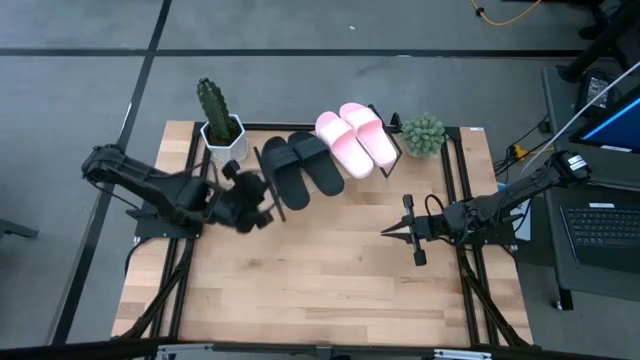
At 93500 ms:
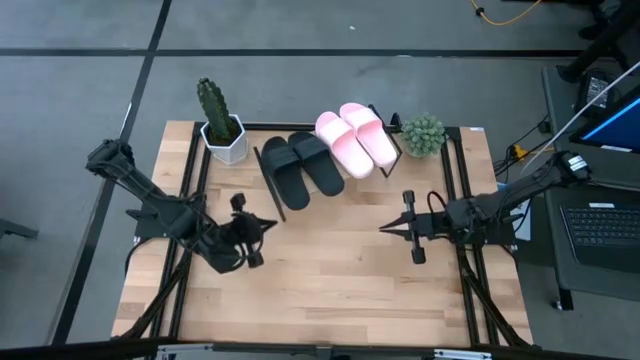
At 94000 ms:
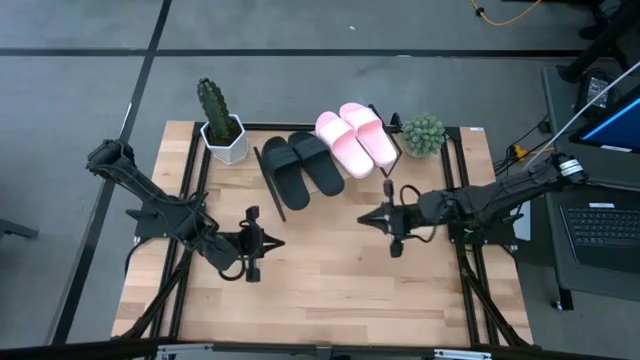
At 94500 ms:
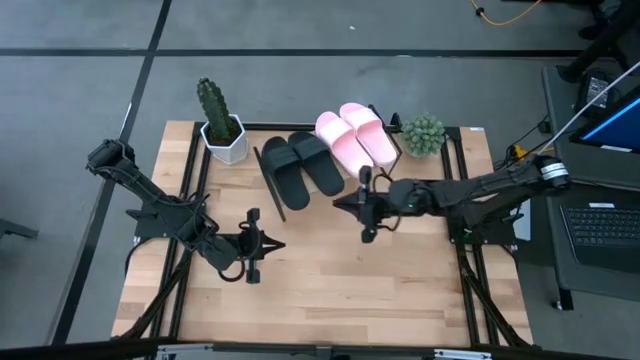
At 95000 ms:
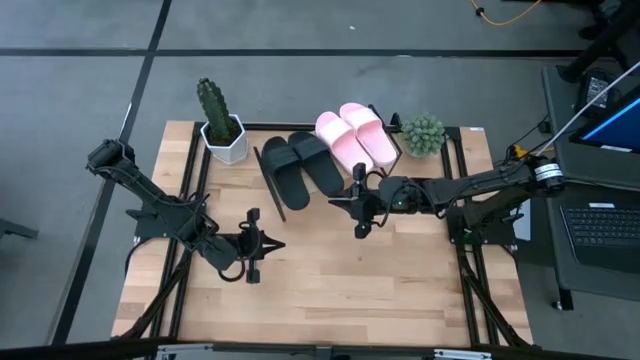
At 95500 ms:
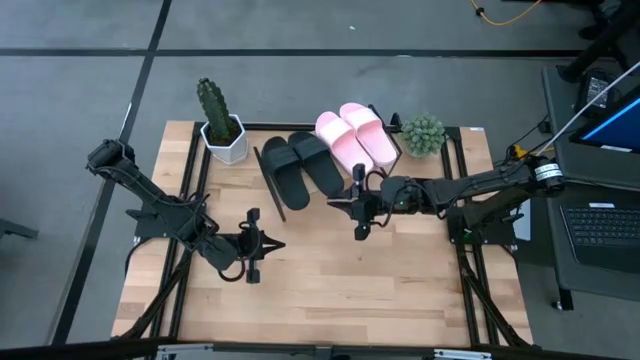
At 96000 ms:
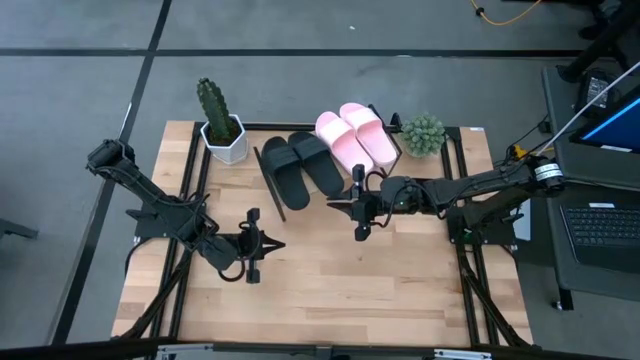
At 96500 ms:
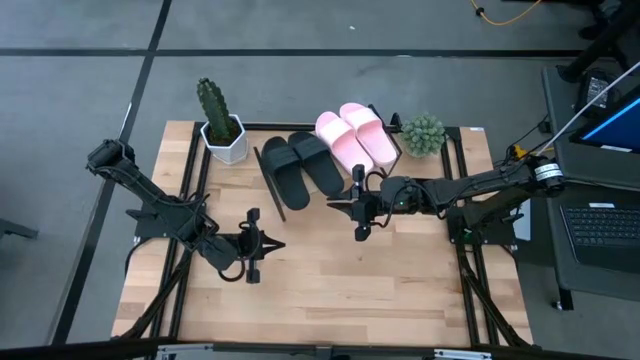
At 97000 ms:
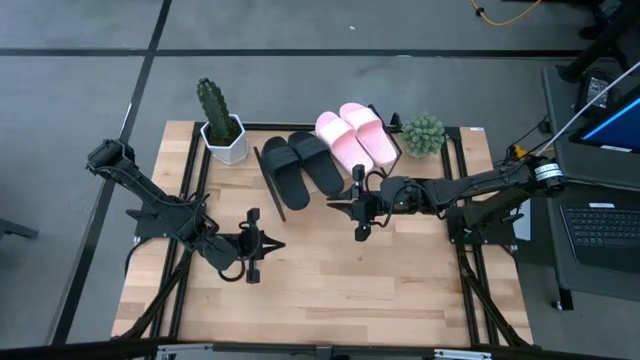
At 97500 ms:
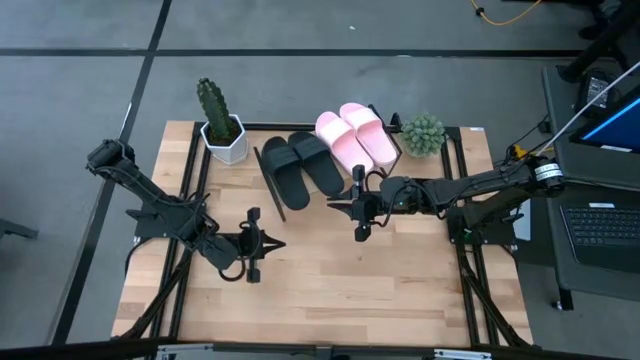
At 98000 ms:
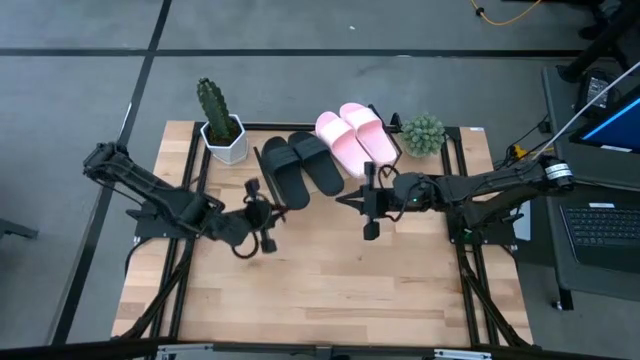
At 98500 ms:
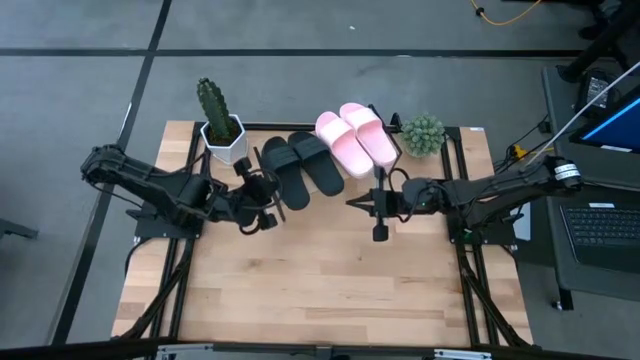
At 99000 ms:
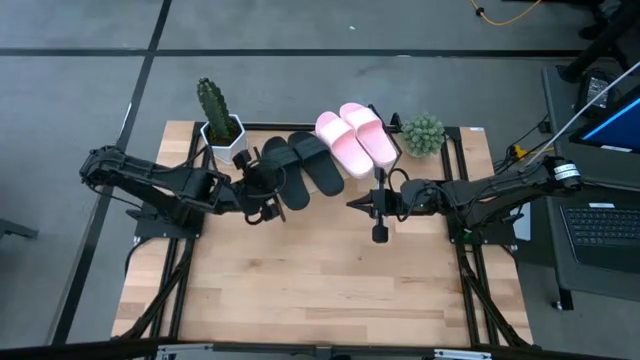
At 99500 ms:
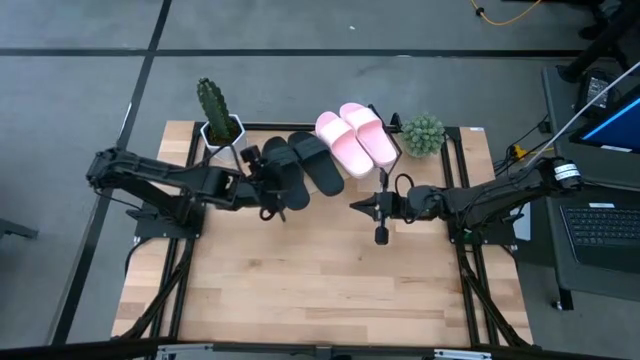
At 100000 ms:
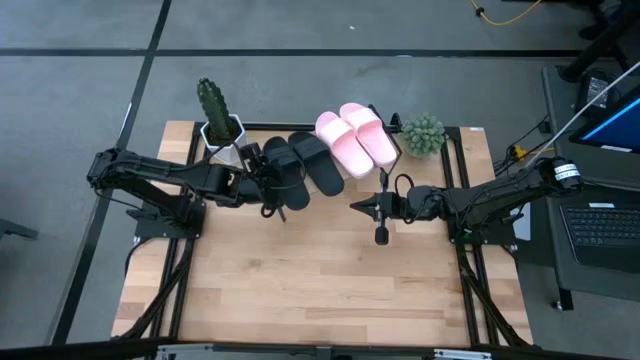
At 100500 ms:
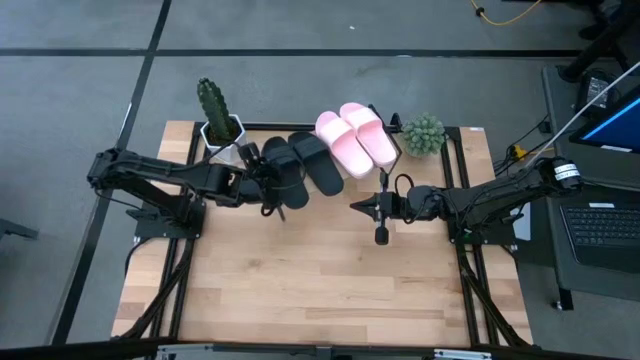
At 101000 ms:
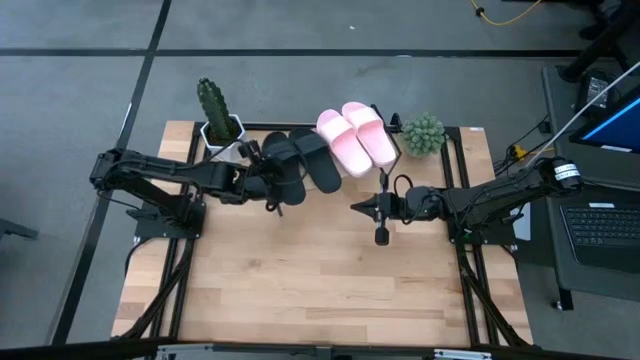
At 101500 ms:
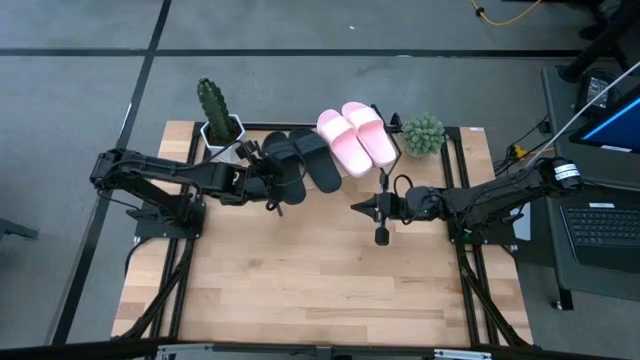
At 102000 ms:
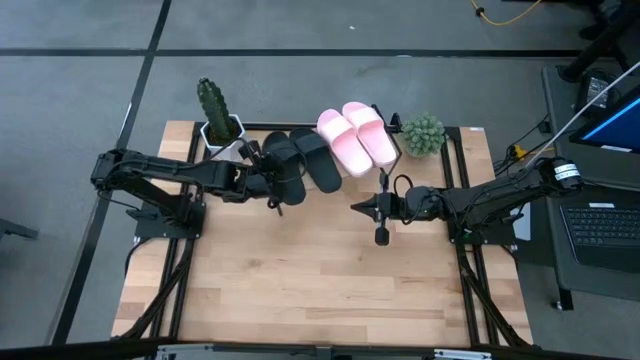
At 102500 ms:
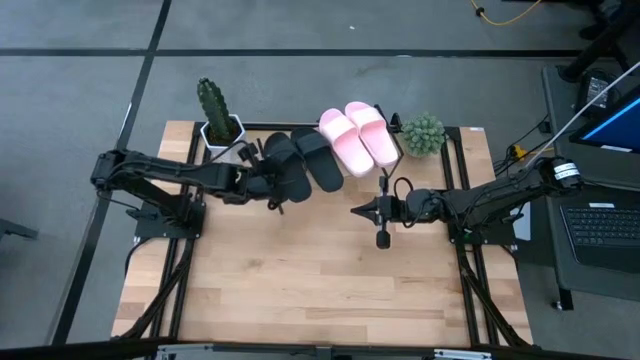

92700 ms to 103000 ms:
Task: Pick and place slides into the shelf
Adjust the left black slide on the shelf

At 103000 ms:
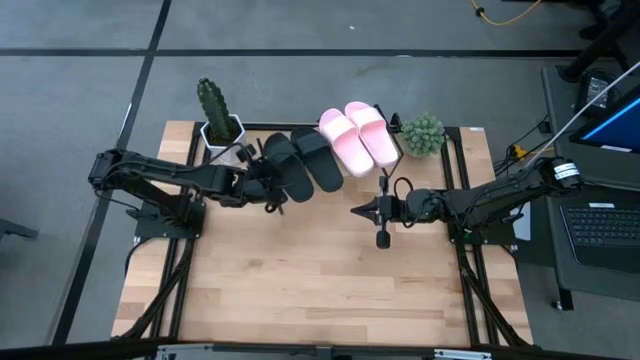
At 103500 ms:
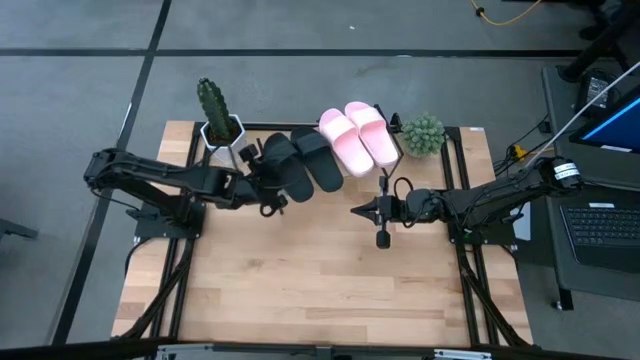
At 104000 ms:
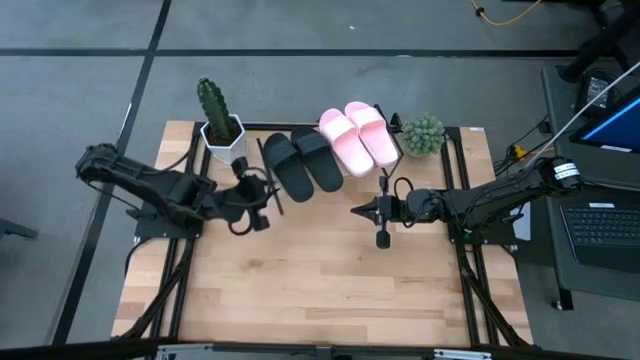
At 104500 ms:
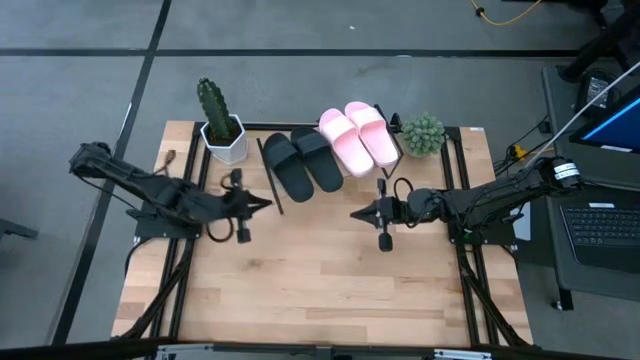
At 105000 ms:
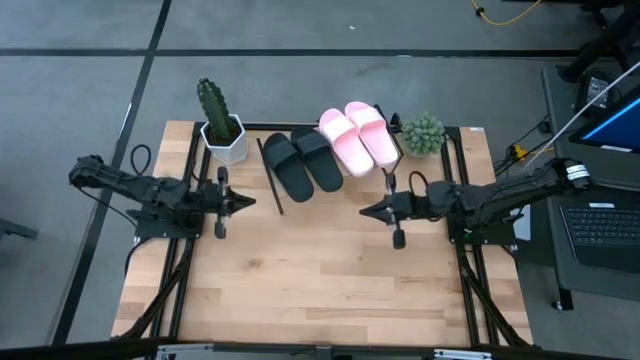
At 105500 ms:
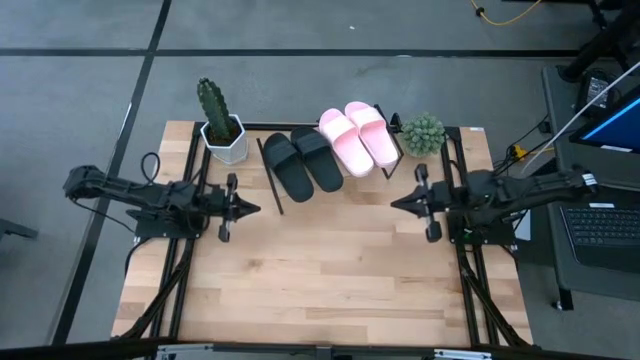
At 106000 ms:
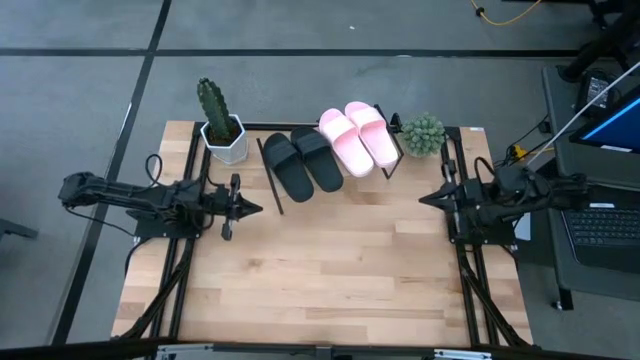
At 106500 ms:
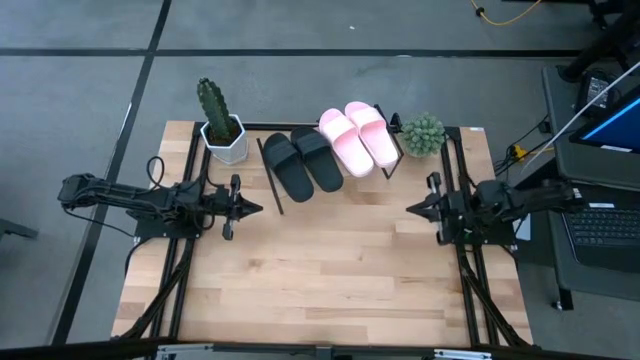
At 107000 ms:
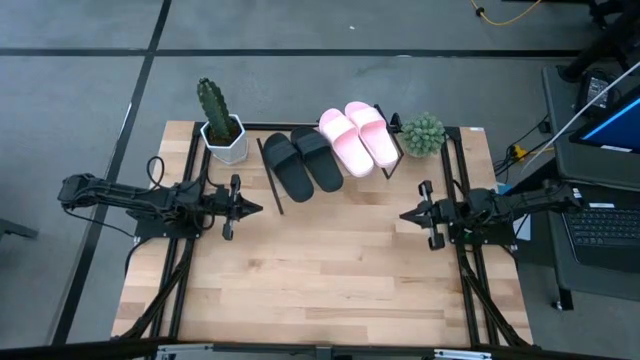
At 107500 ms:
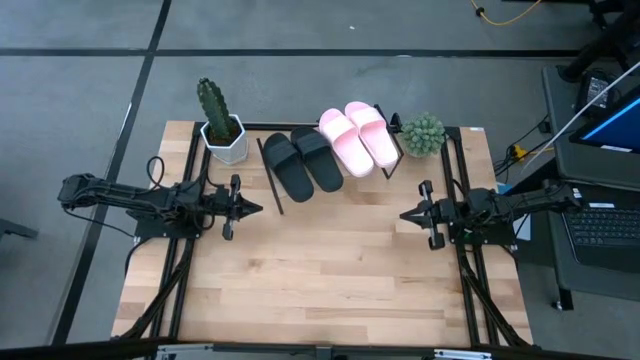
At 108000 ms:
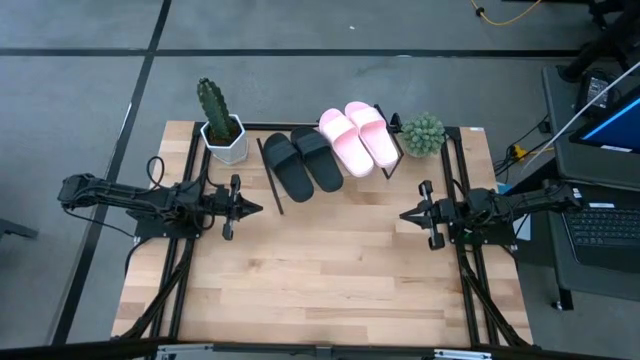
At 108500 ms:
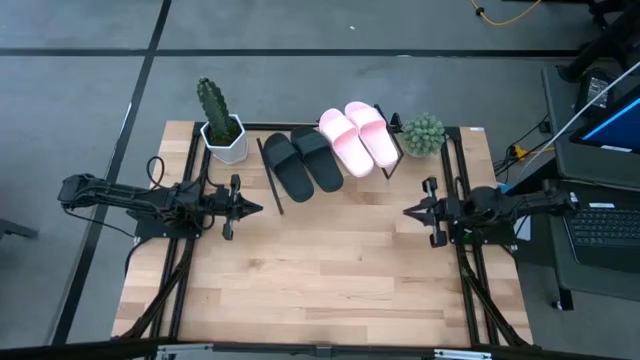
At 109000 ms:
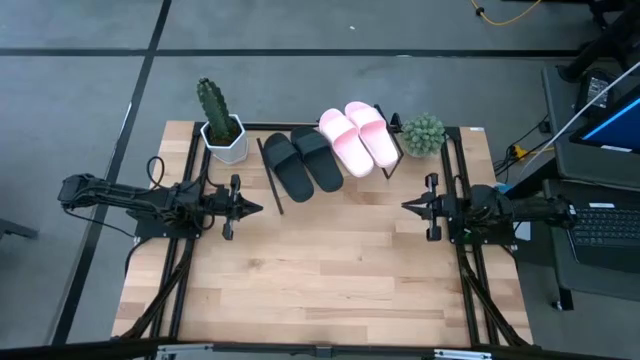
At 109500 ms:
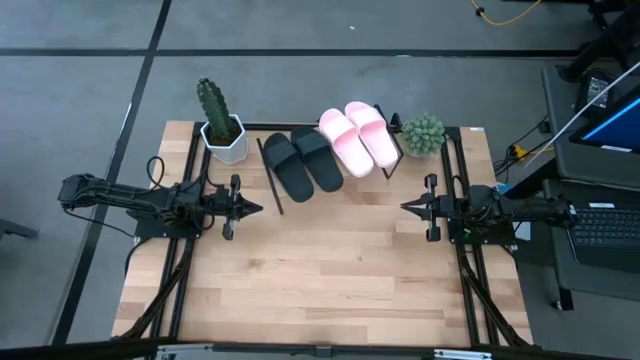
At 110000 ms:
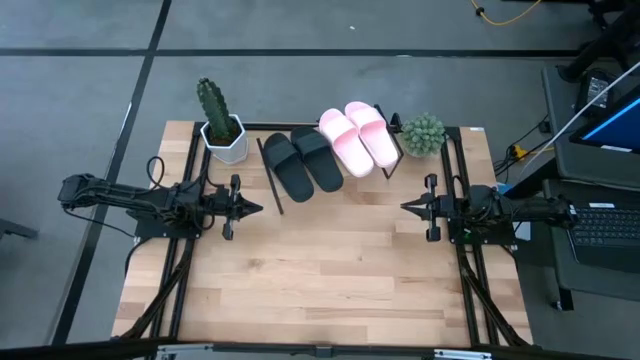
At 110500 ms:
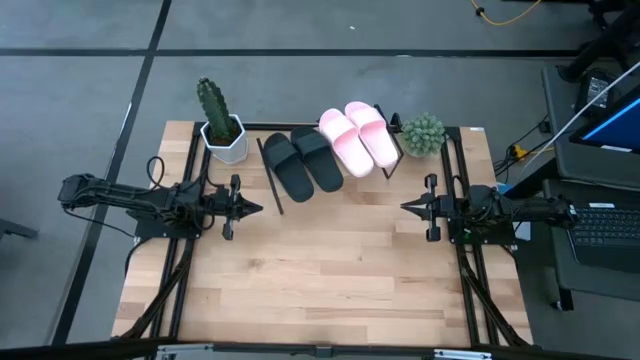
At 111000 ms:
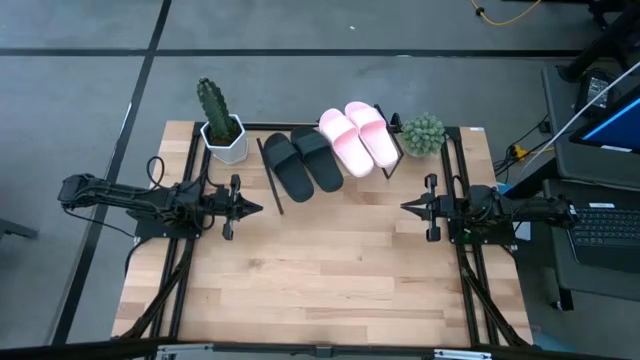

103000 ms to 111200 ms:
Return to Home Position

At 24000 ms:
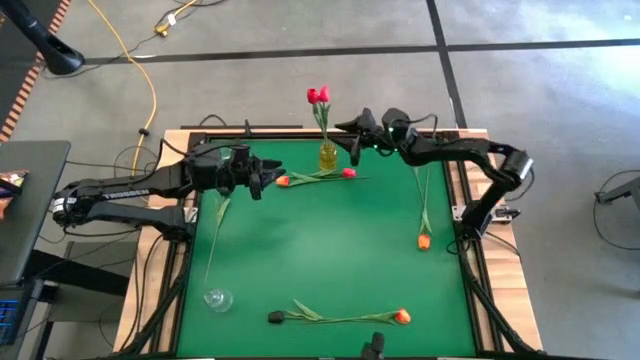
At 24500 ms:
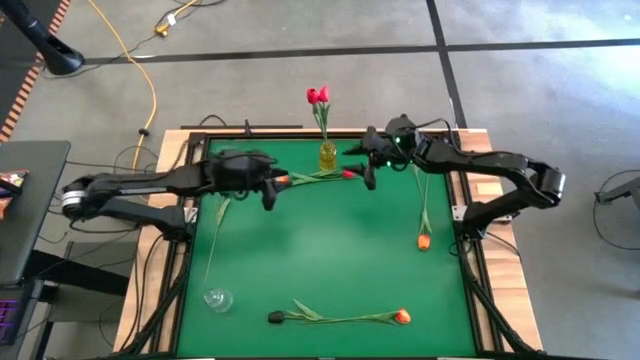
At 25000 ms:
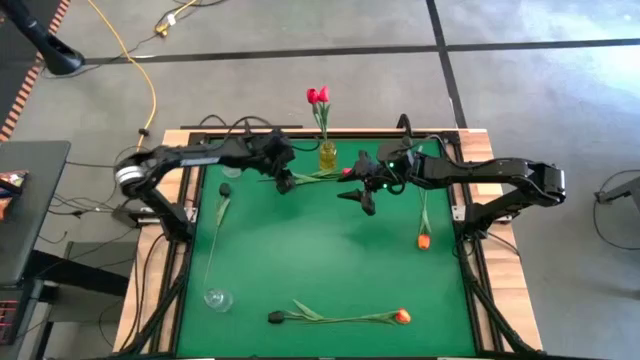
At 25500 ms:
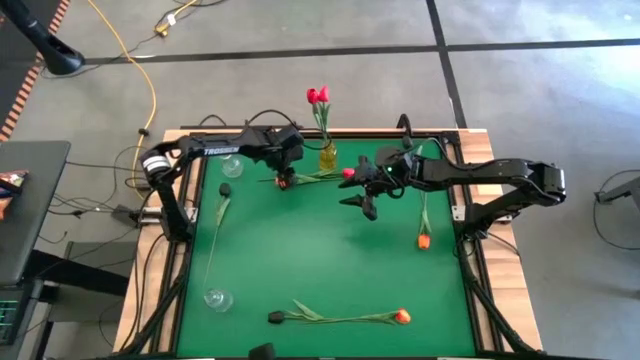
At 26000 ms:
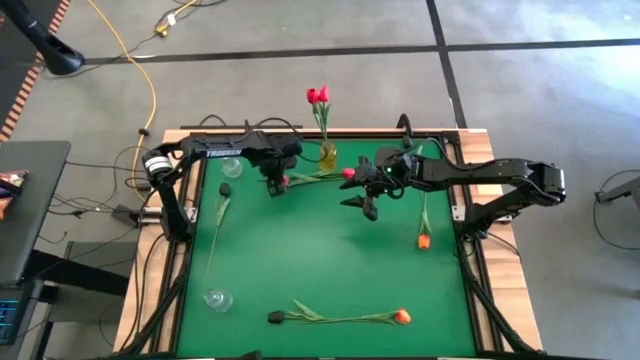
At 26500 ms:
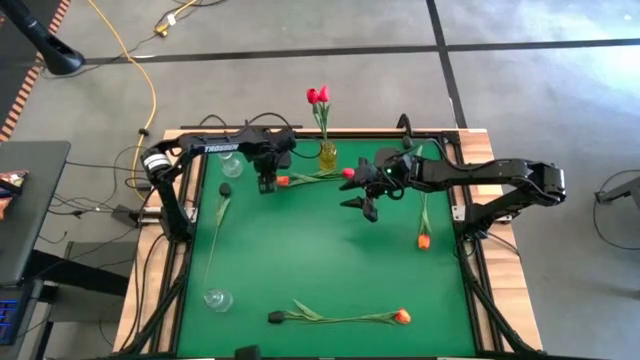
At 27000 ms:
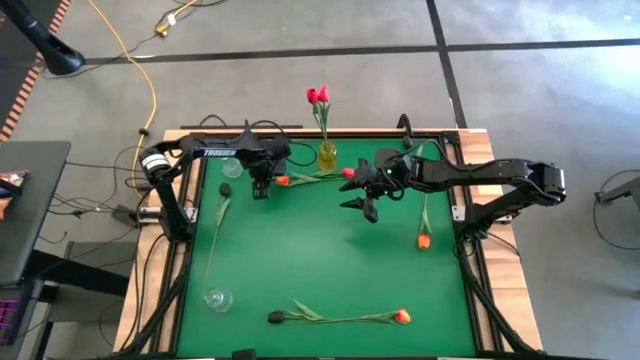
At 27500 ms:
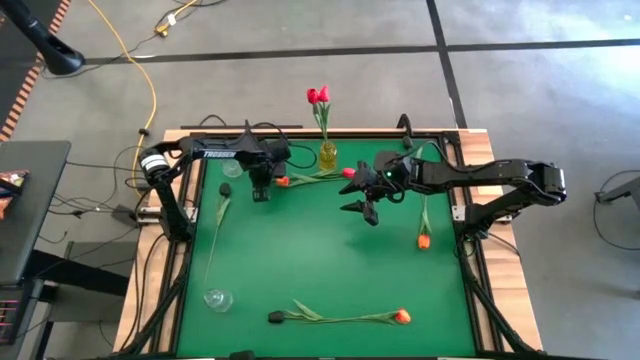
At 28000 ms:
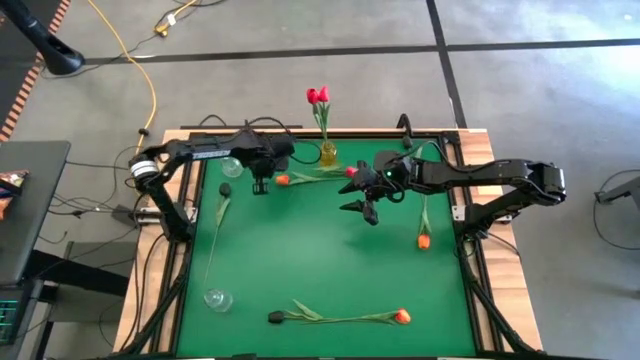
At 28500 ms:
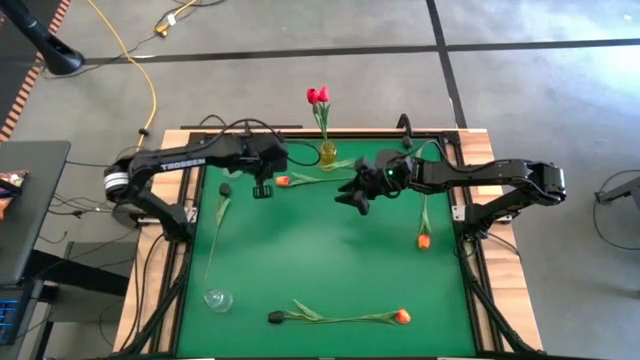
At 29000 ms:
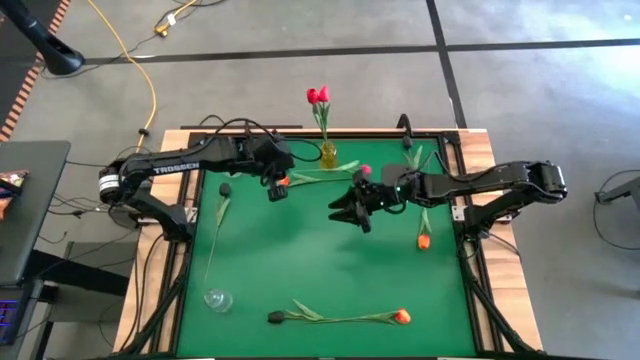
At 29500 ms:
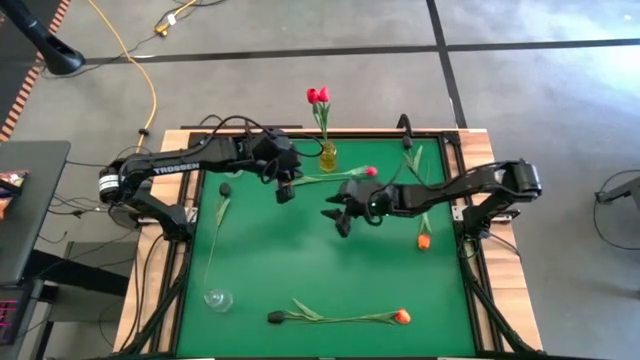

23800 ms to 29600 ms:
Task: Sort flowers into vase by color
Put the red flower into the yellow vase
